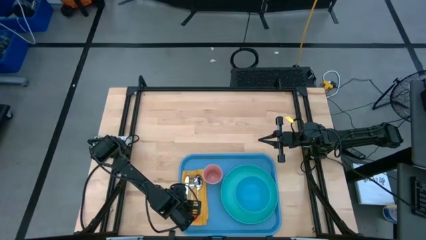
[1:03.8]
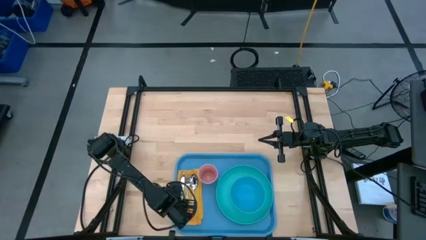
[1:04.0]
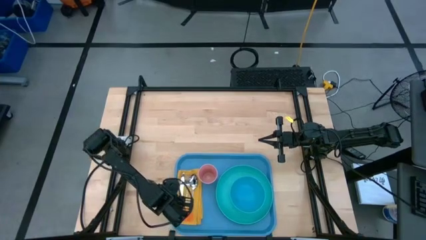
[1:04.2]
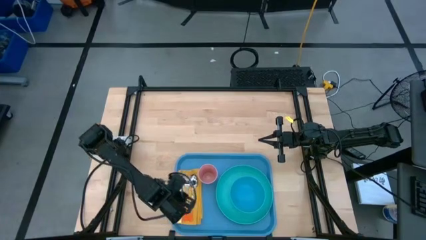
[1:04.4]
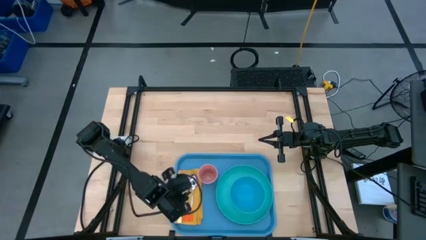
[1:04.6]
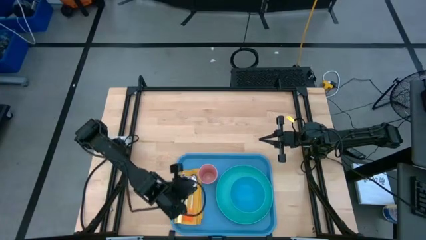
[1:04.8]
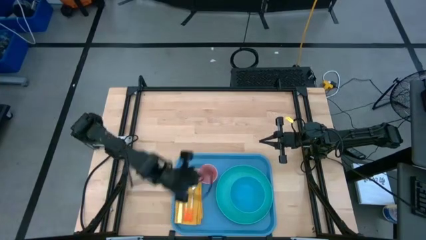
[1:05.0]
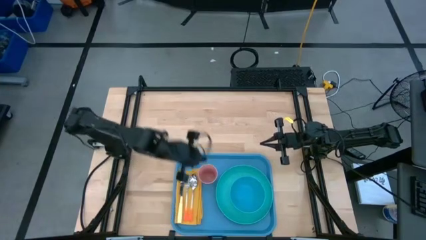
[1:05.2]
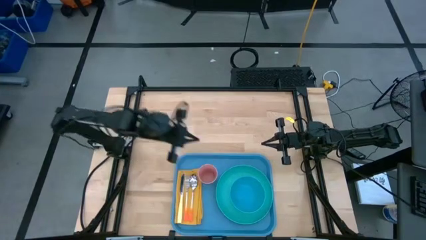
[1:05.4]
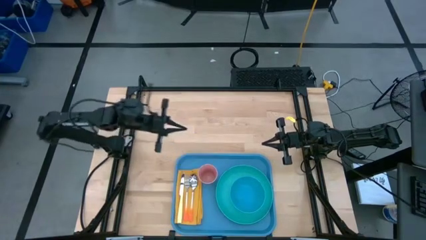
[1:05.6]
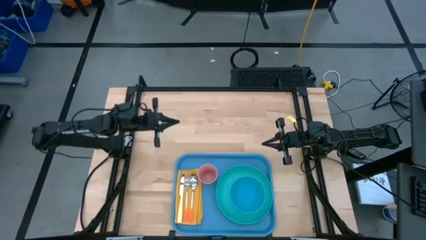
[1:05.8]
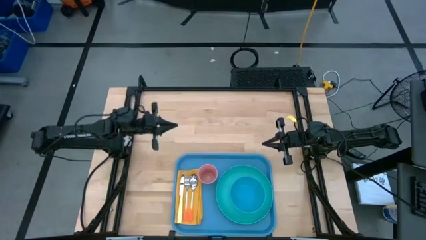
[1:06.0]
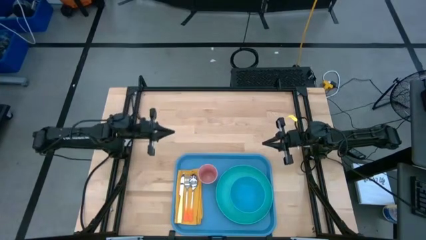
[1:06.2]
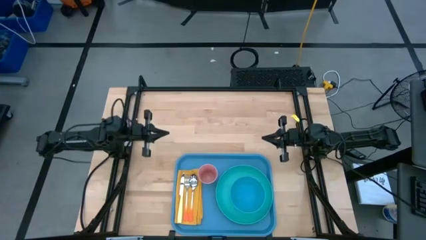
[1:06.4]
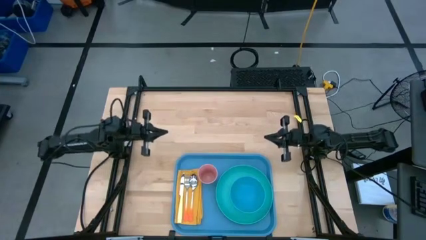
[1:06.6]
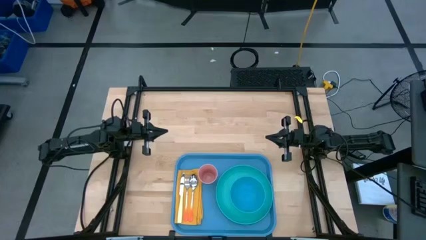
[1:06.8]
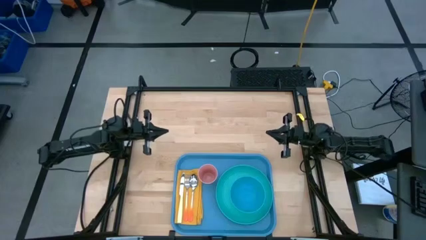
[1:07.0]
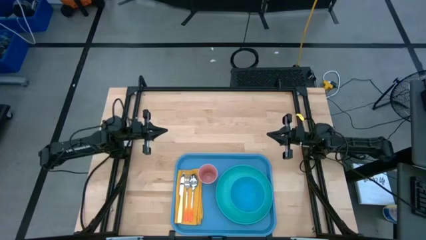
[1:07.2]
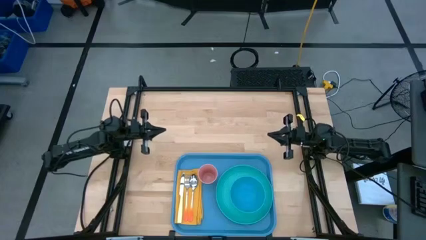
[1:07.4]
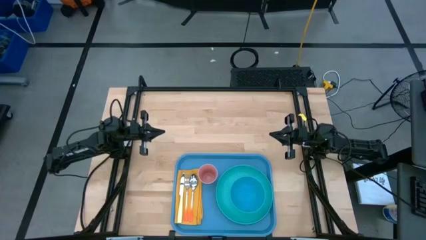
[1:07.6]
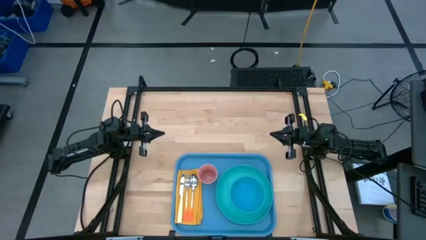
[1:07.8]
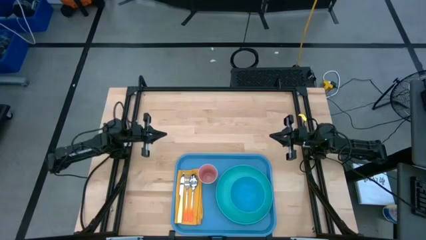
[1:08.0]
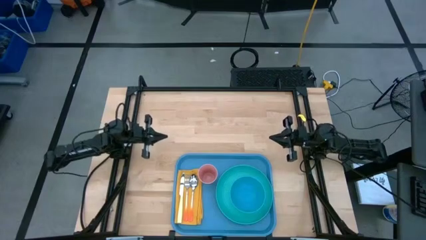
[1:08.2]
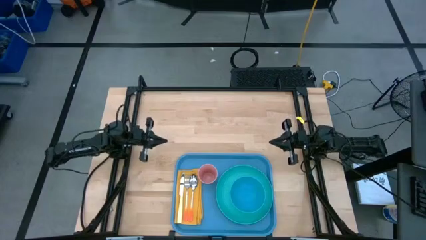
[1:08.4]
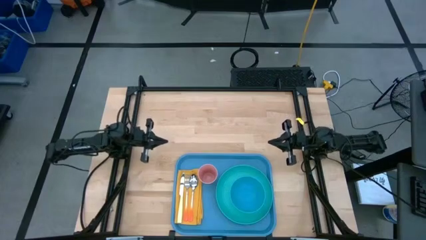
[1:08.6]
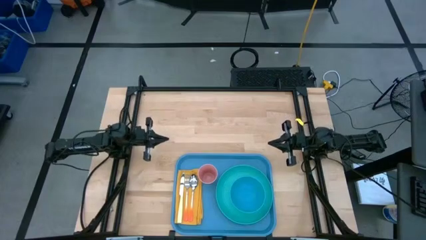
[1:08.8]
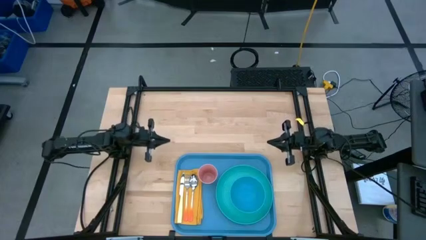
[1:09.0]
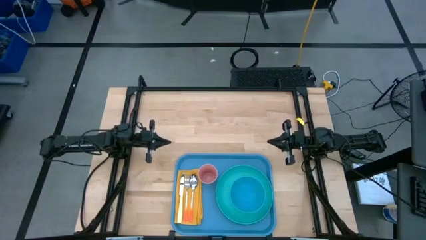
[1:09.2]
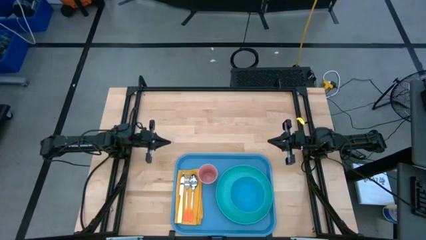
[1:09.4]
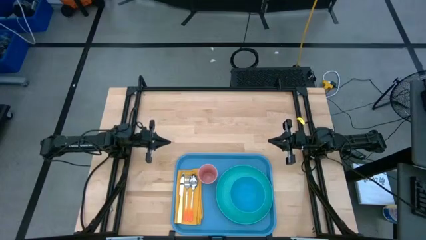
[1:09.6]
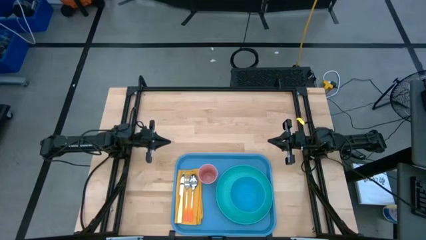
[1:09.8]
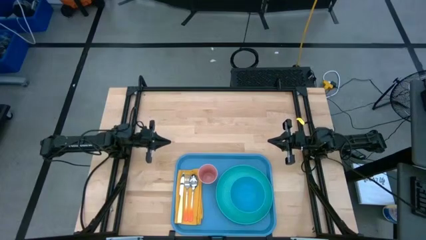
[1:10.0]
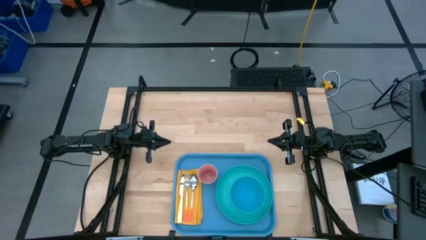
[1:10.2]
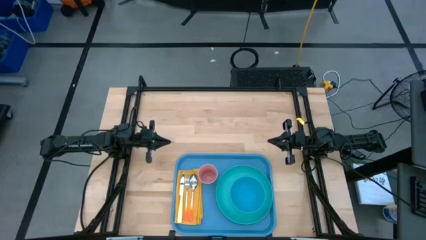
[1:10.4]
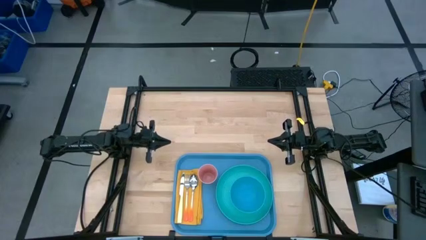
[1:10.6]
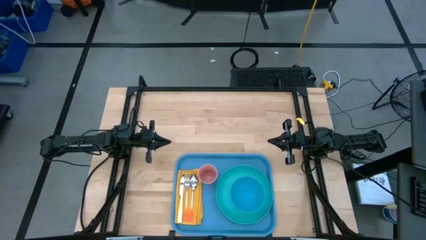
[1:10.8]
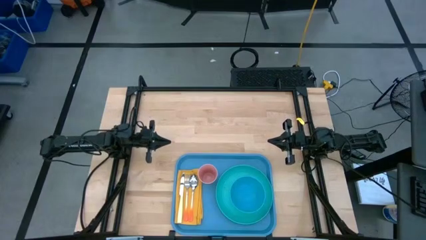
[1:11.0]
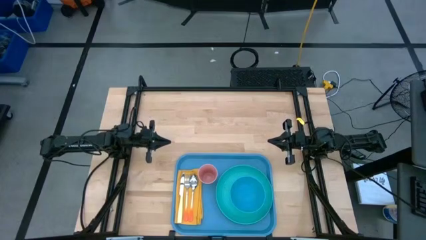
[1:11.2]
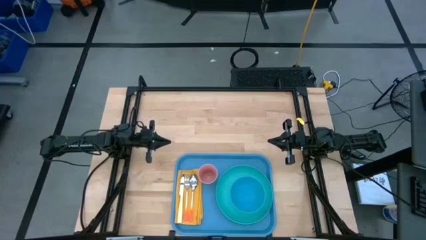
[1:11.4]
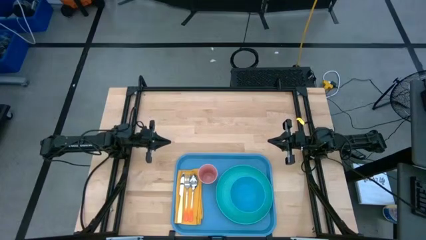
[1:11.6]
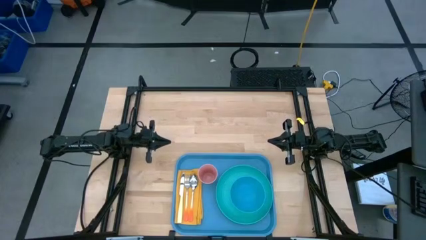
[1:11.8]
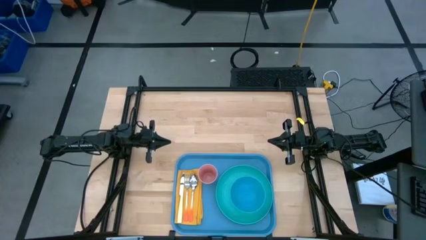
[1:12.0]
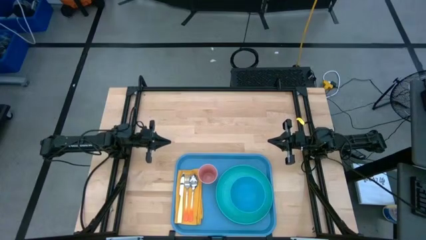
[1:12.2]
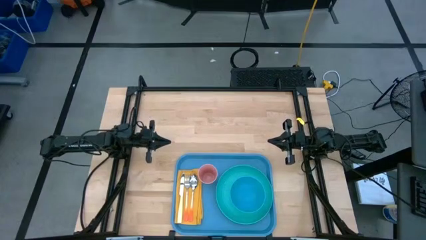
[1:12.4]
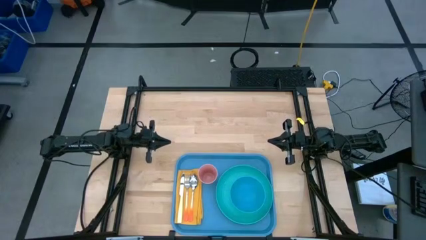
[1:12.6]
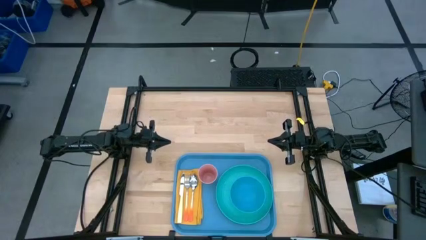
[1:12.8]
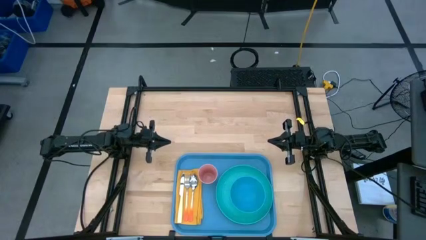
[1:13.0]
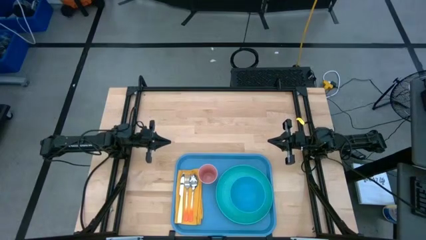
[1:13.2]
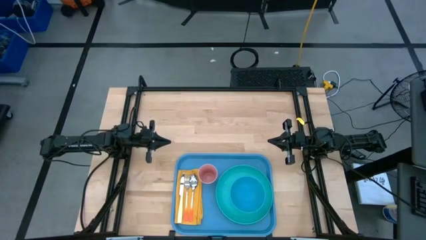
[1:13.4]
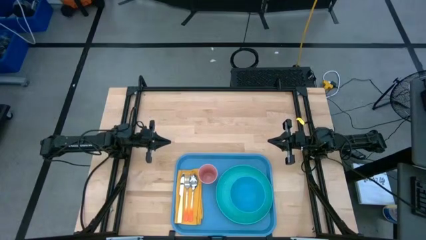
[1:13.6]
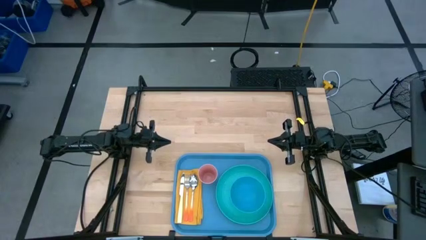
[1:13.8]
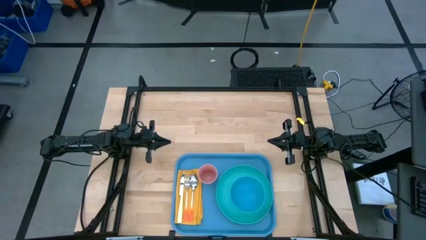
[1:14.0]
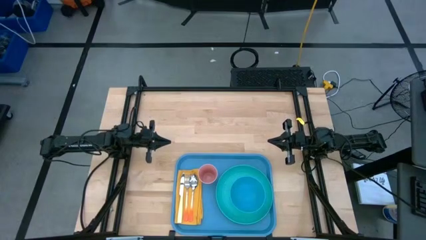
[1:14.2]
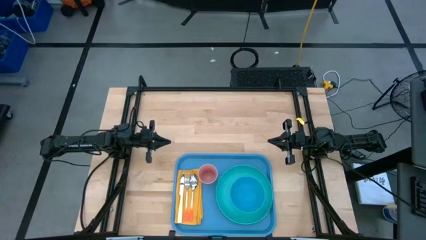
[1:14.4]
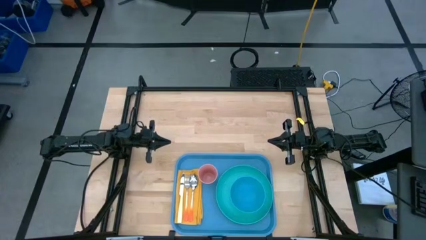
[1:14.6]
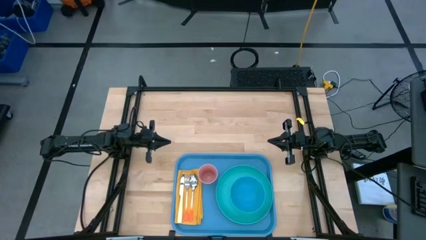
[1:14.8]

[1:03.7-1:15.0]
Task: Set up tray
Return to Home Position

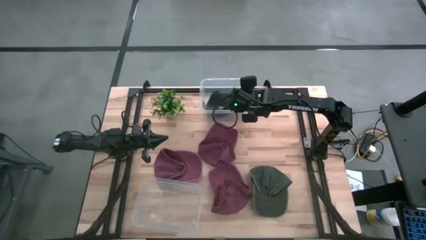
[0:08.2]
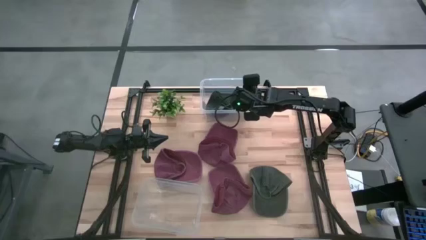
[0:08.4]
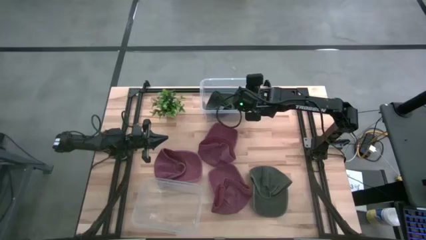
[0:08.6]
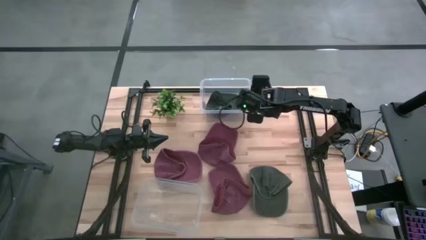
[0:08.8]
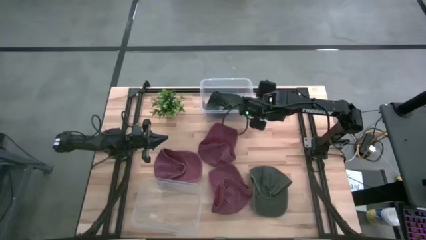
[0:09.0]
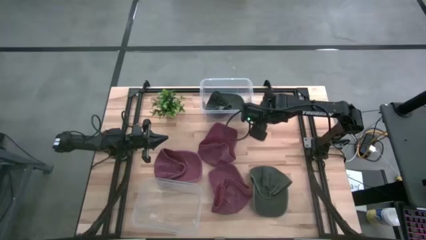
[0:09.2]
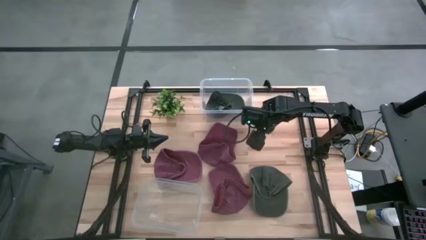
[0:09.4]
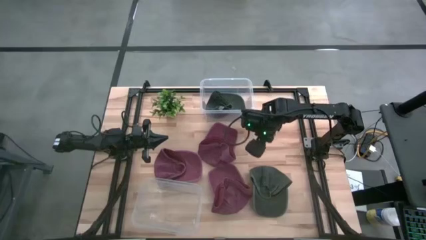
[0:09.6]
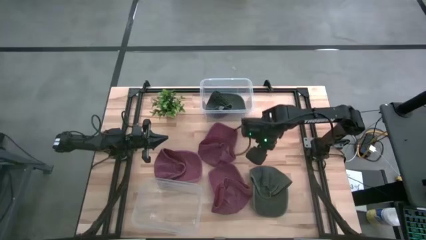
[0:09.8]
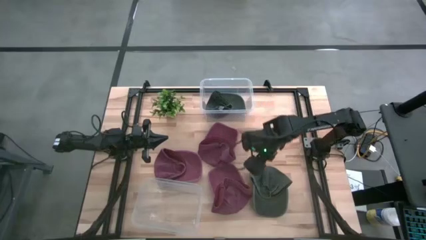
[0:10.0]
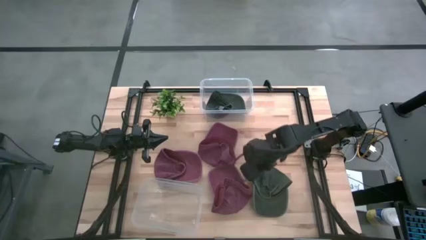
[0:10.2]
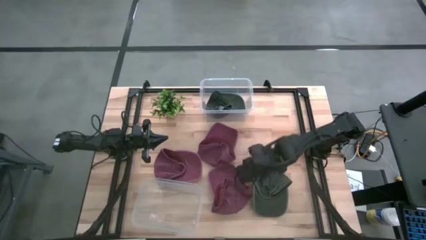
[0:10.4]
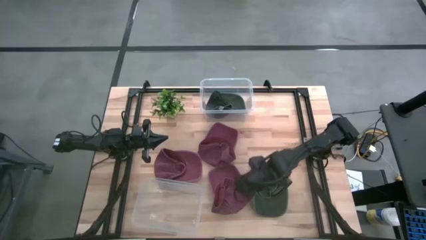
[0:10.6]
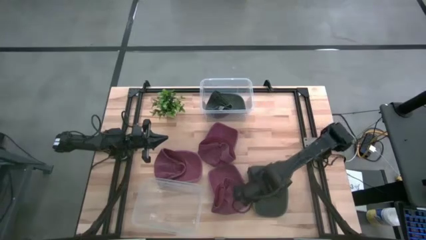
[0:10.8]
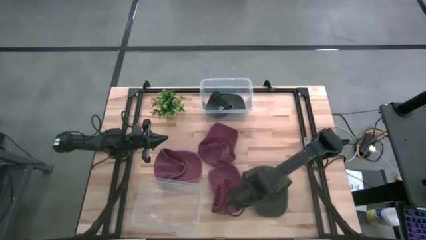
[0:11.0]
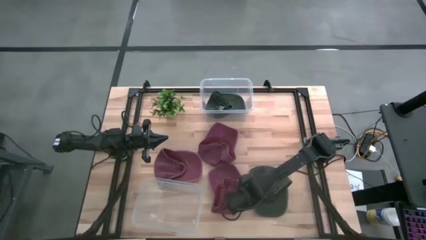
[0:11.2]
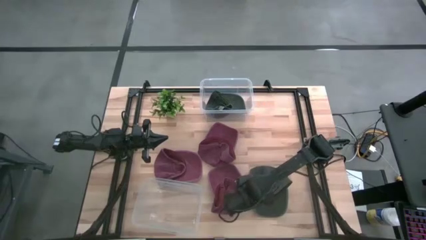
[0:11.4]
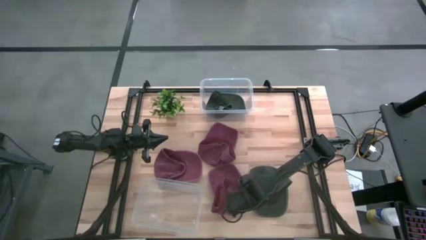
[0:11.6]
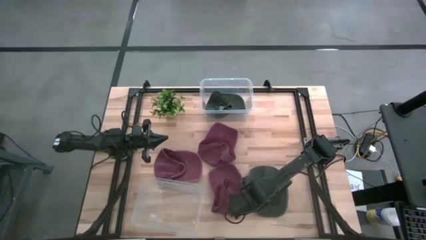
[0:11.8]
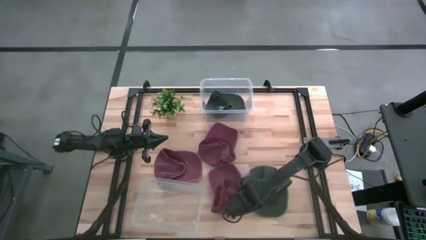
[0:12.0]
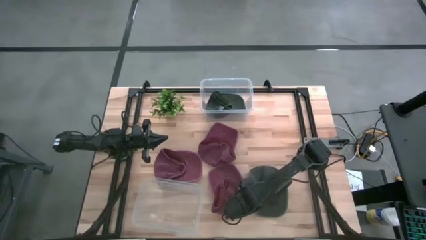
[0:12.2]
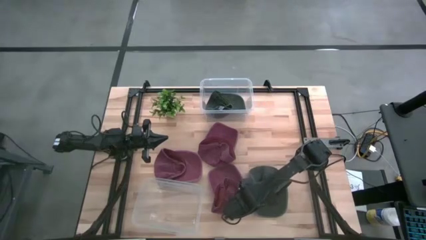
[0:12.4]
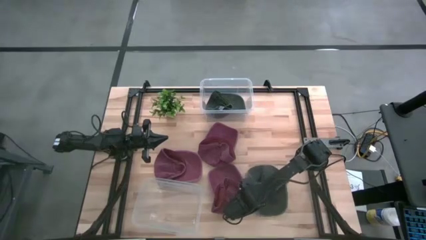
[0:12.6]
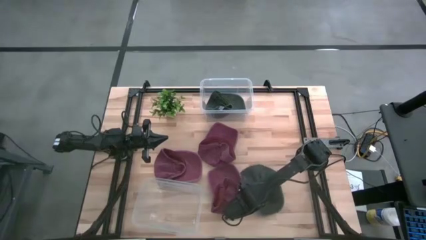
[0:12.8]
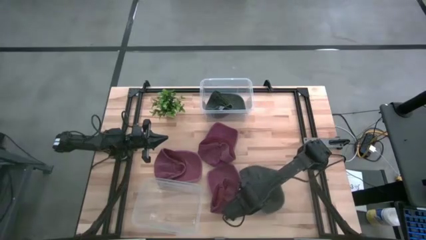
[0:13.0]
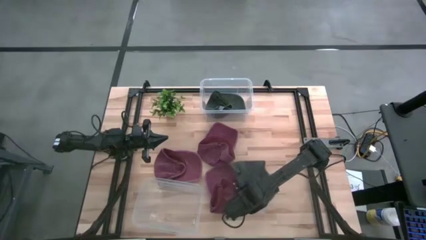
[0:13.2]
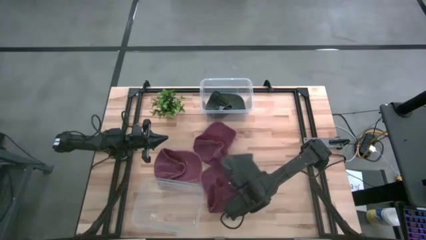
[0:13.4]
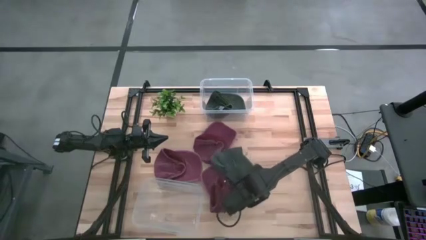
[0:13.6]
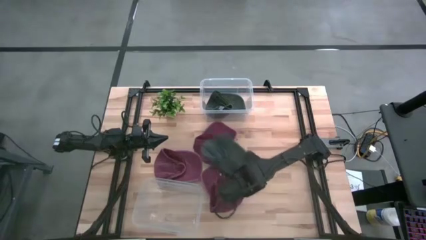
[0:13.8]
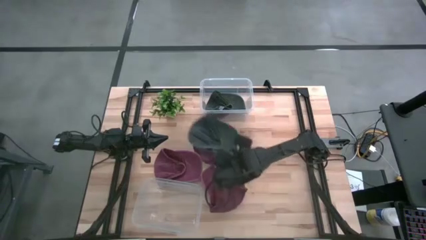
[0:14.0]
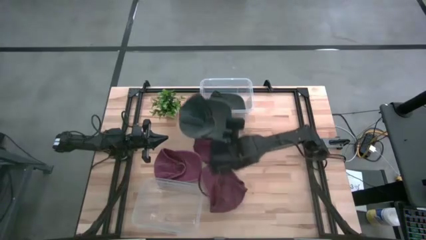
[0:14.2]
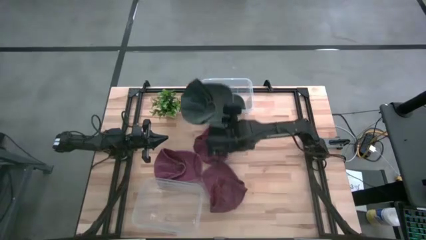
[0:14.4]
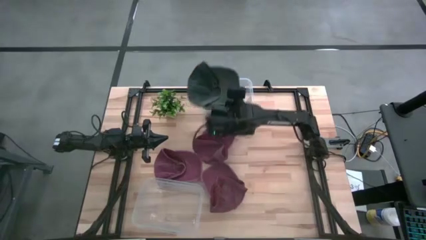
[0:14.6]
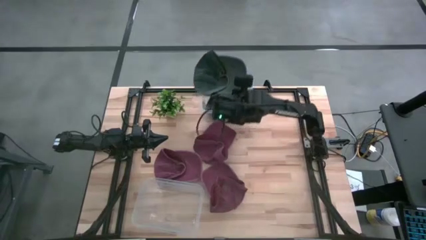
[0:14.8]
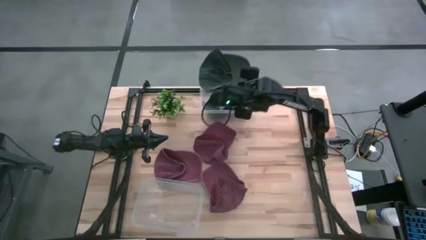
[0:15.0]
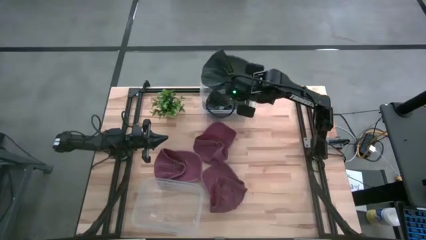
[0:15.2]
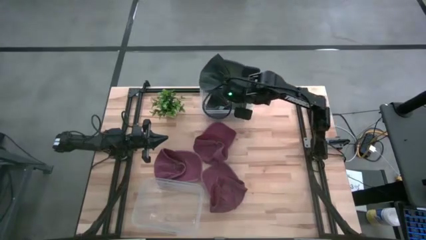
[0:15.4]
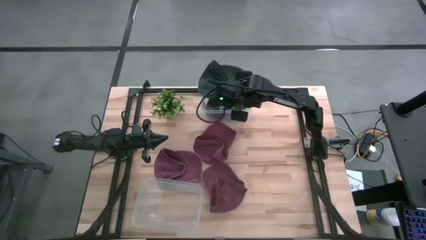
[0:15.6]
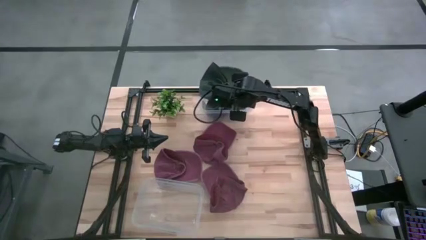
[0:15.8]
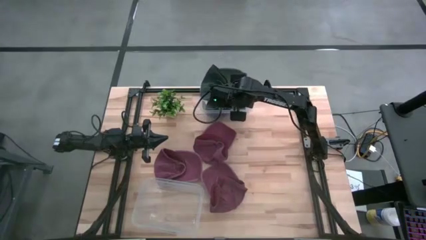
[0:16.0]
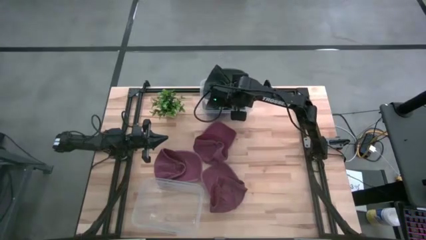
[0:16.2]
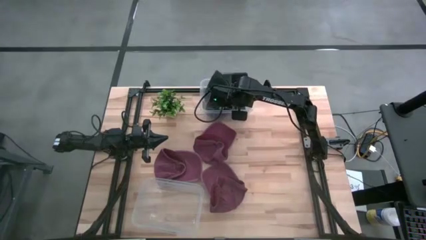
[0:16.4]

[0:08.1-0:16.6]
Task: Pick & Place hat
Put the green cap into the top transparent bin
